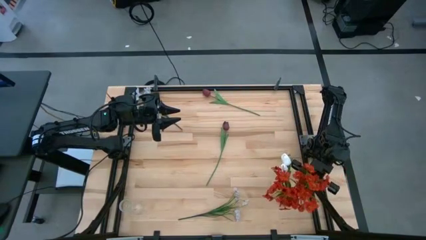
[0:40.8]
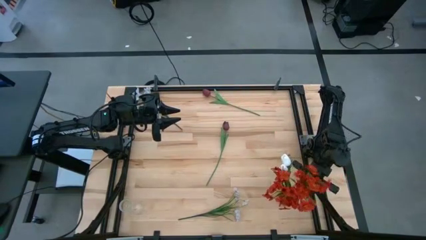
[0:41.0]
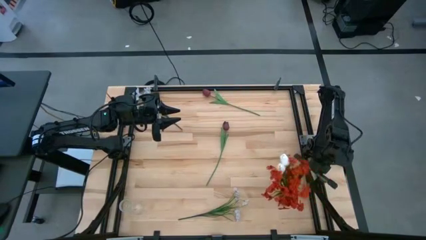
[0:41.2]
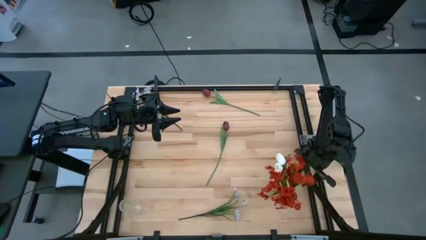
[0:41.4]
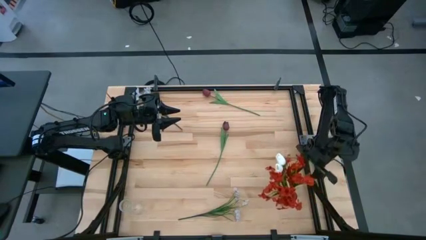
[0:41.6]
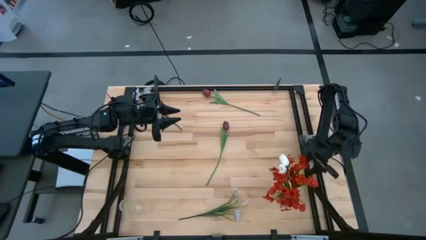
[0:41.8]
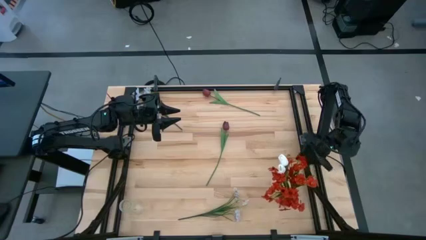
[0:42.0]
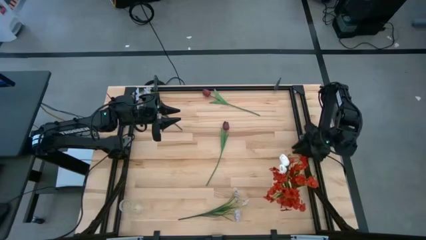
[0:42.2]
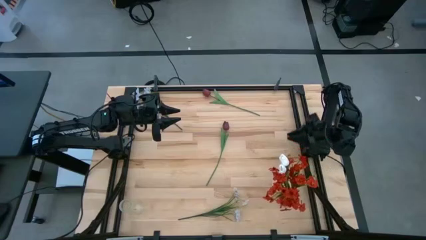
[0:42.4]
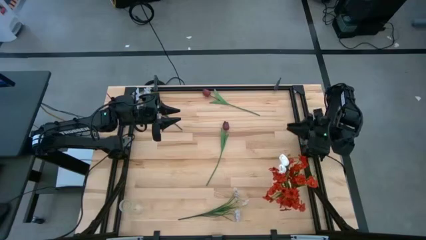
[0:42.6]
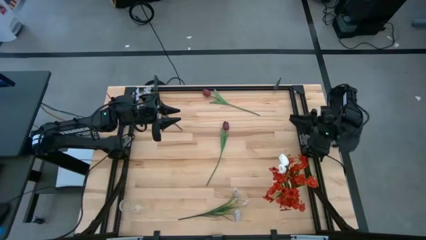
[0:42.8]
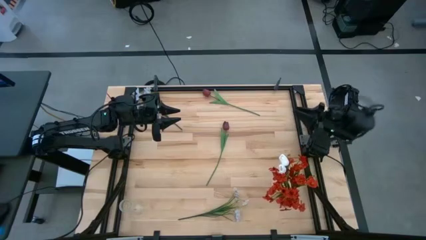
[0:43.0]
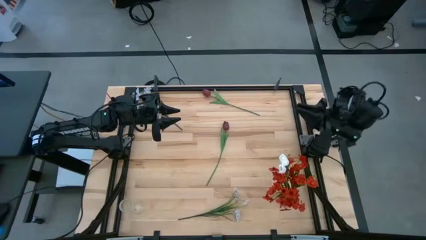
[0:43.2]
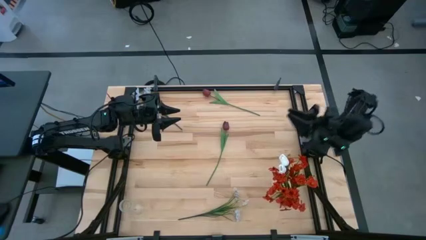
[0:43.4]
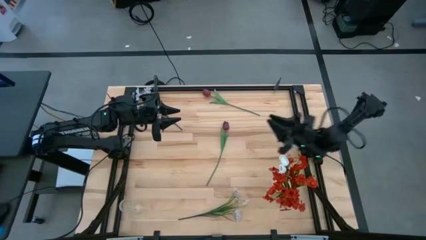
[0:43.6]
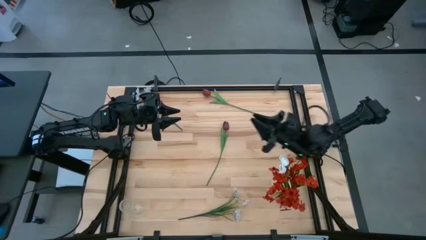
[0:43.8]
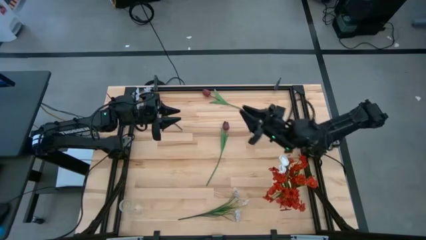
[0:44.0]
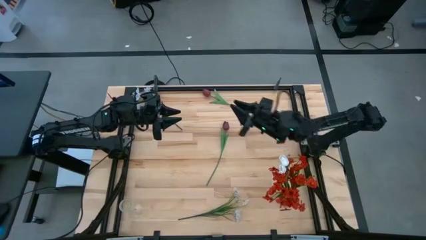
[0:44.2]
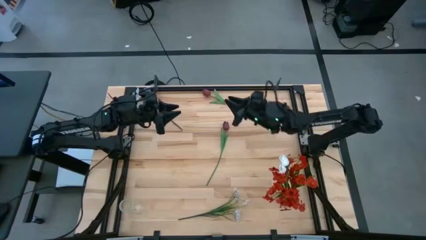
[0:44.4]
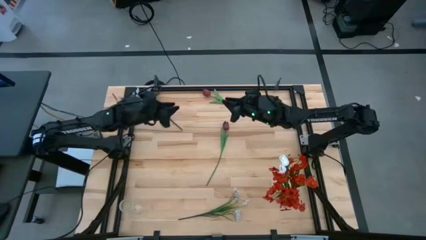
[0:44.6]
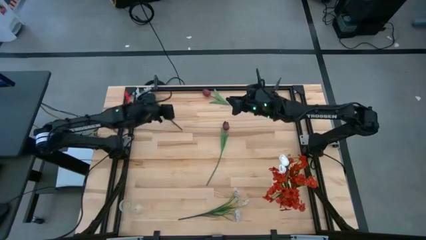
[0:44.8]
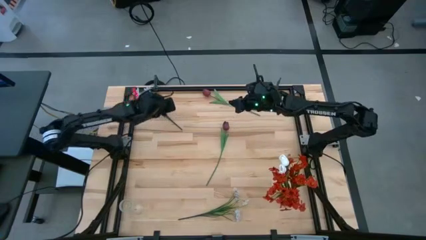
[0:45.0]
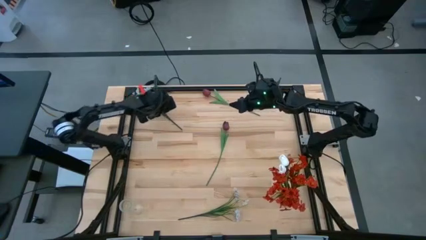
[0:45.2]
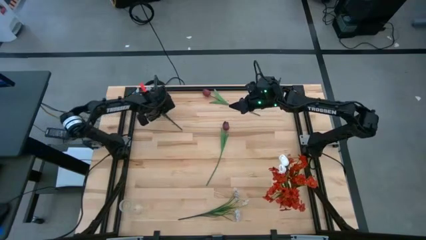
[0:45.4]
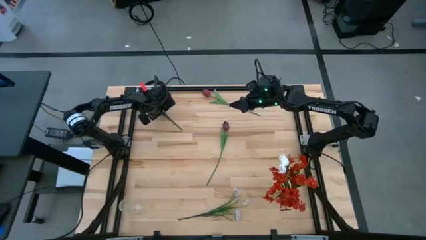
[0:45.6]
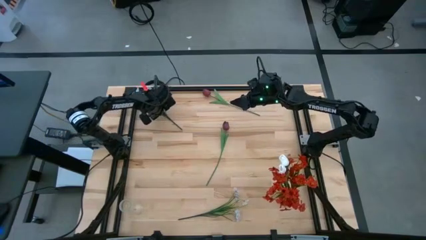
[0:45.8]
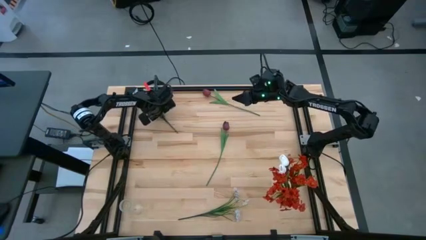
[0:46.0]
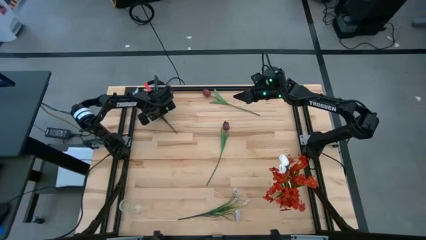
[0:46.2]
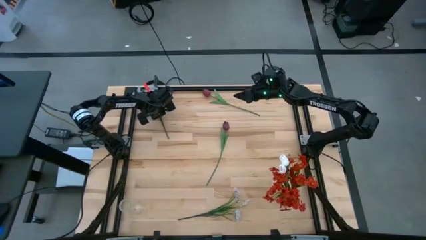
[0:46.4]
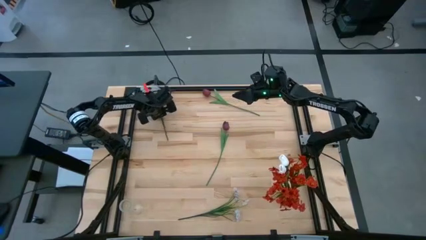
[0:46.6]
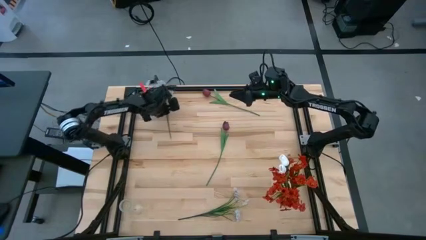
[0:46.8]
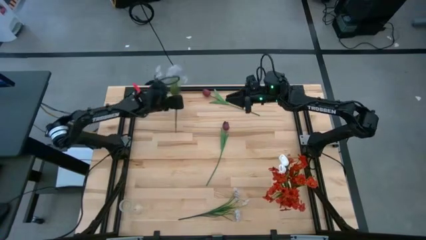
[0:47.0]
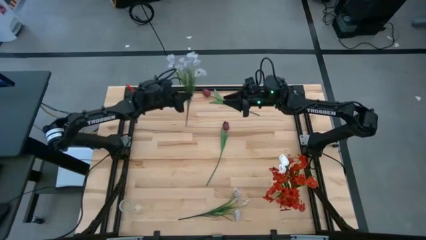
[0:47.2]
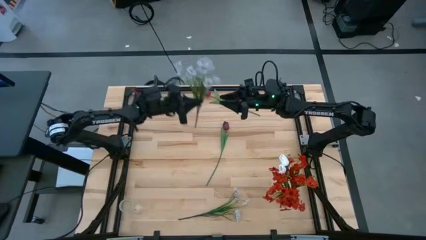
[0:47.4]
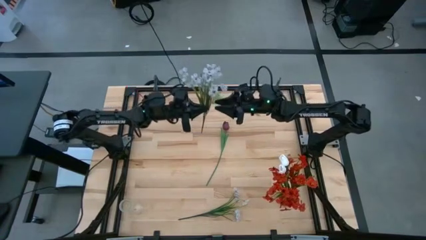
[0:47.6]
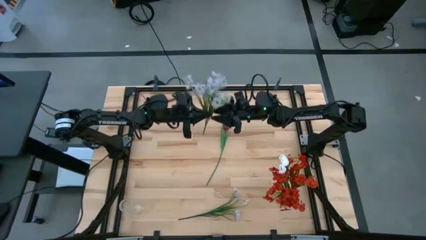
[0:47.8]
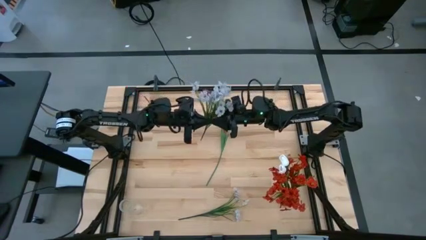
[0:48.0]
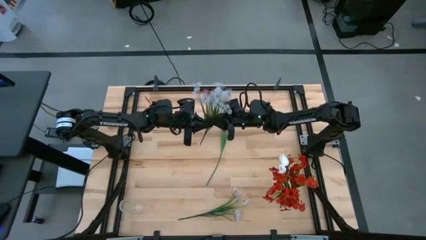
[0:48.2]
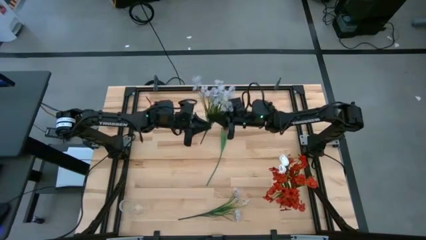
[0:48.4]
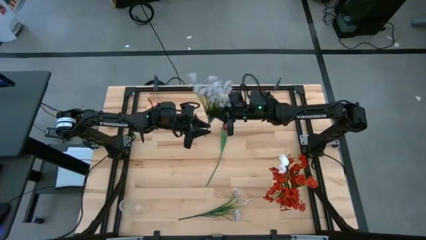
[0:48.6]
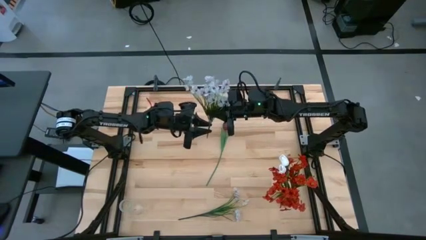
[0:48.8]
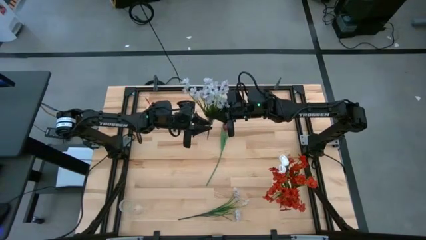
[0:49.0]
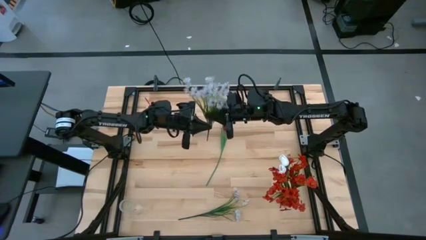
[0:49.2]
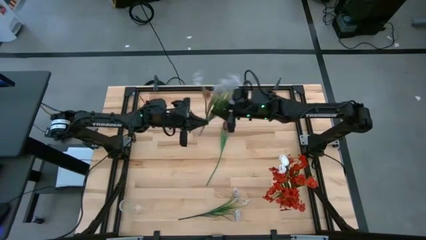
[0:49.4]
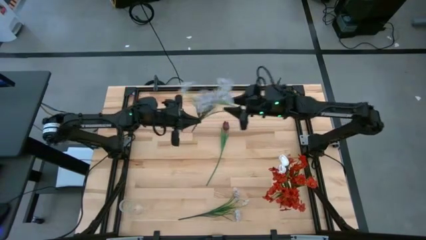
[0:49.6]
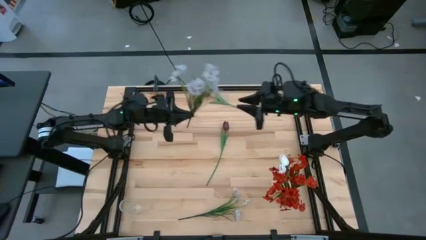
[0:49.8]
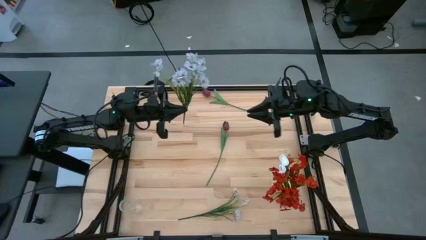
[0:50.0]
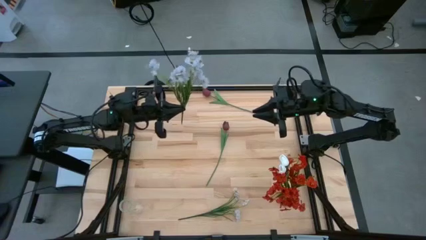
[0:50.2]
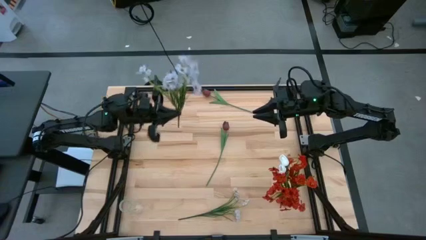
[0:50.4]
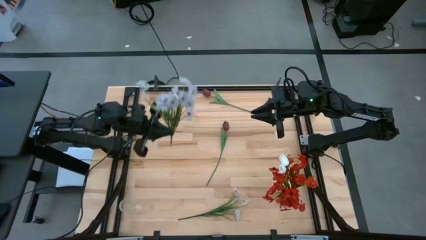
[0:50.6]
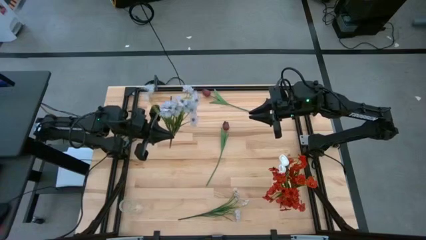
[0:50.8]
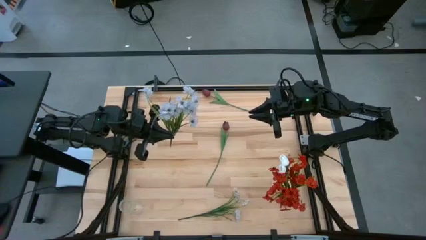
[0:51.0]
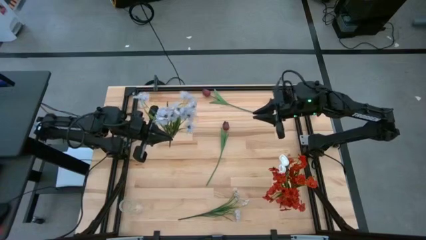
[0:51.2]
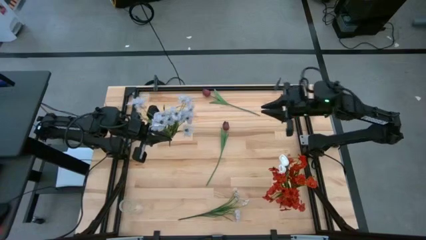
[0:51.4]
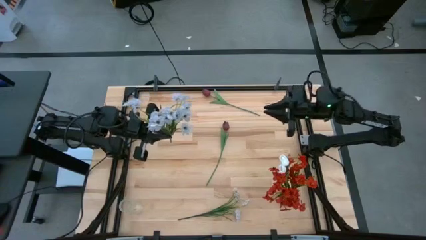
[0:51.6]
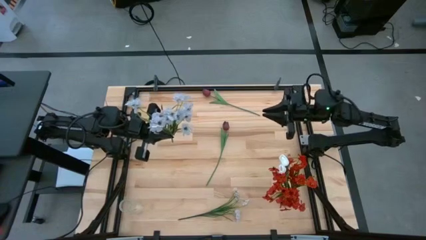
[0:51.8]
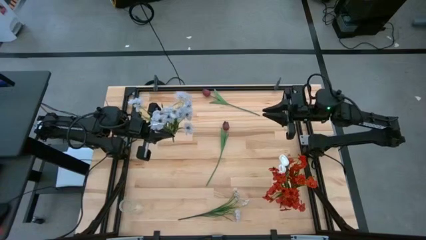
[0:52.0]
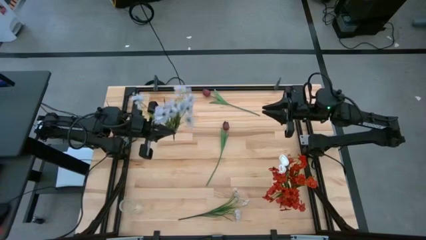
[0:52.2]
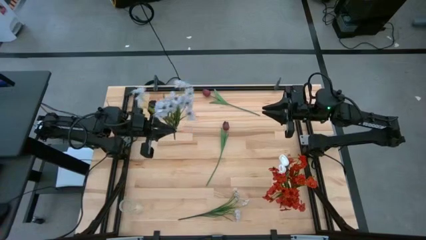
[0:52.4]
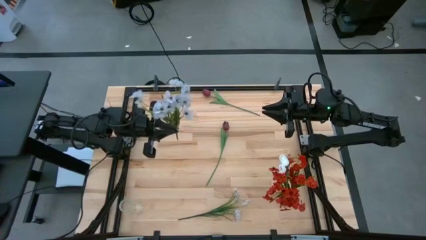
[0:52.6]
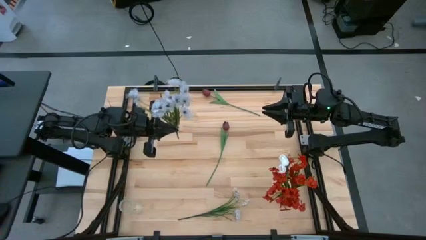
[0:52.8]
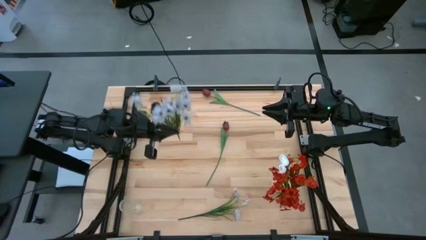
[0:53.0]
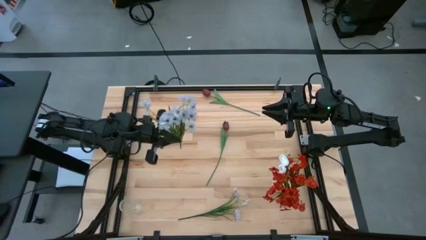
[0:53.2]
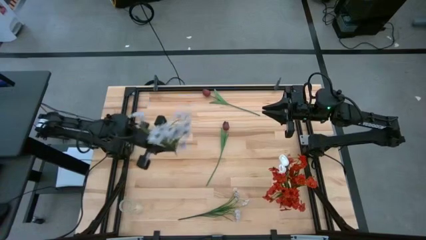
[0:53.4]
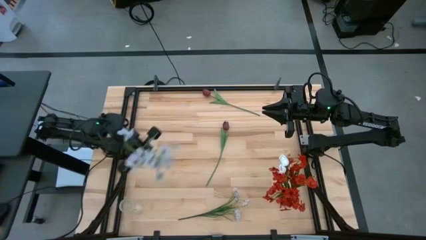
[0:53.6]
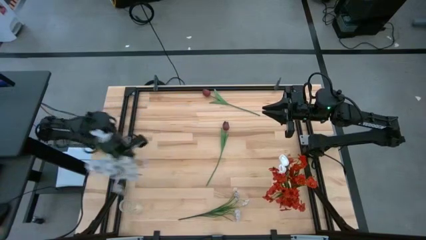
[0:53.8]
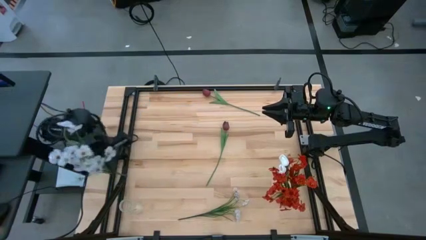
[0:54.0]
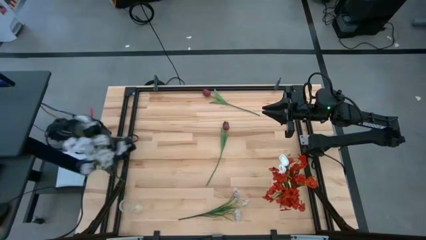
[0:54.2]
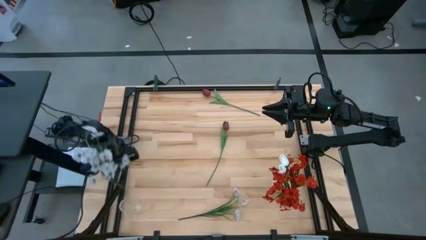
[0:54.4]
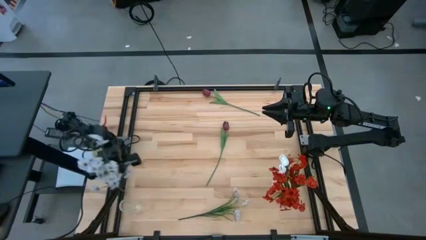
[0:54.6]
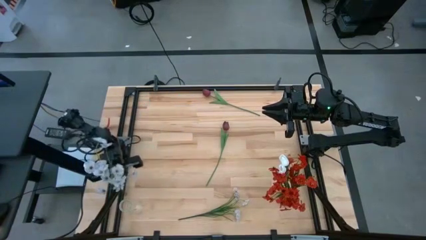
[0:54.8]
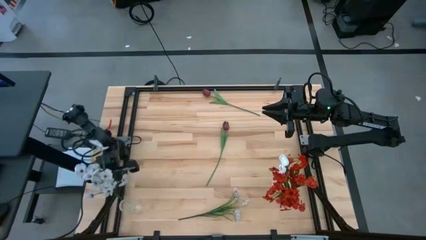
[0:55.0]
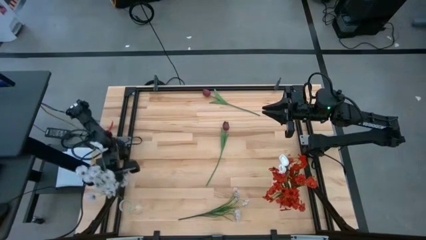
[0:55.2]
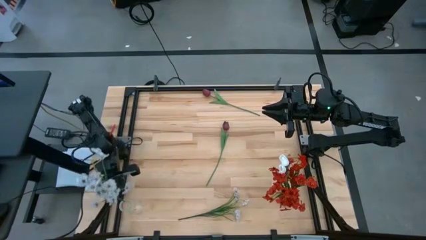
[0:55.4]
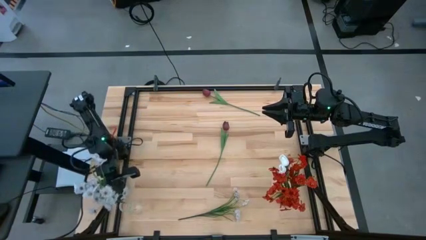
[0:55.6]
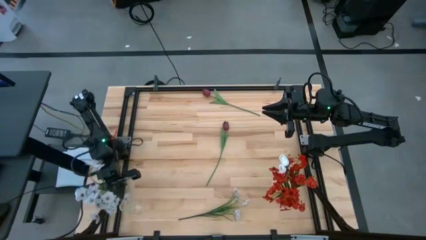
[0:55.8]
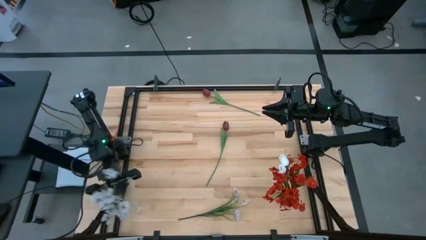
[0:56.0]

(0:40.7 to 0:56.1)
Task: Sort flowers into vase by color
Put the top left white flowers into the transparent vase

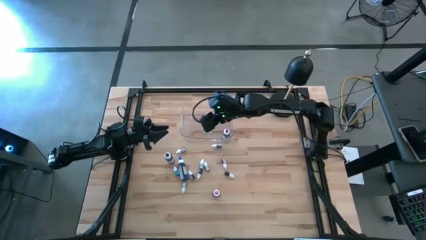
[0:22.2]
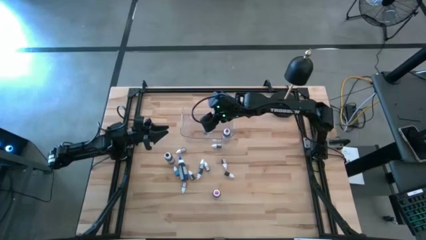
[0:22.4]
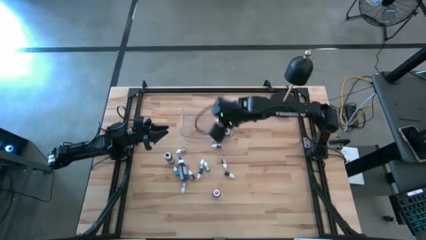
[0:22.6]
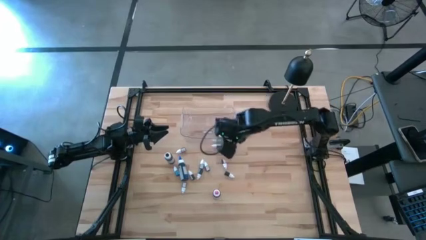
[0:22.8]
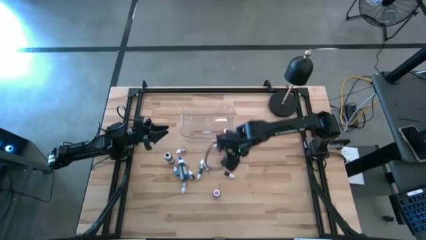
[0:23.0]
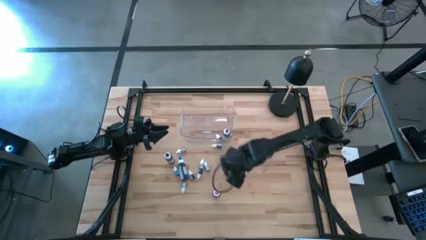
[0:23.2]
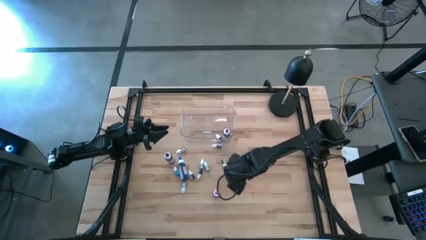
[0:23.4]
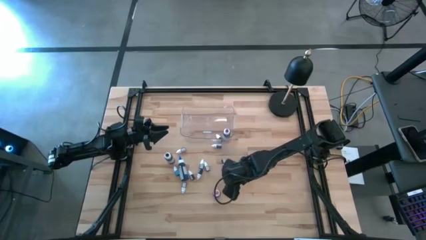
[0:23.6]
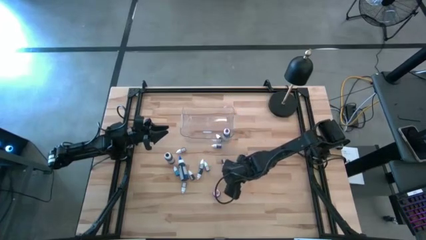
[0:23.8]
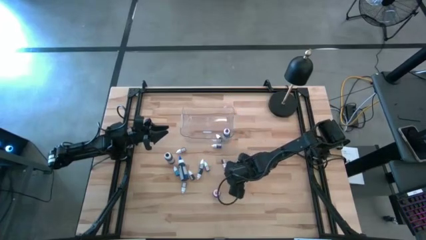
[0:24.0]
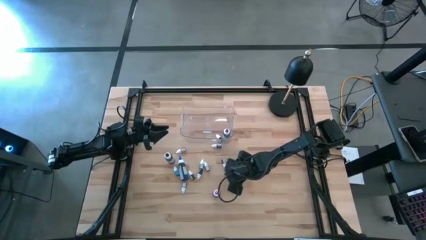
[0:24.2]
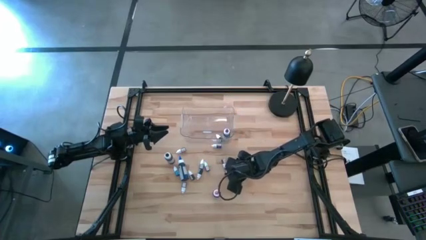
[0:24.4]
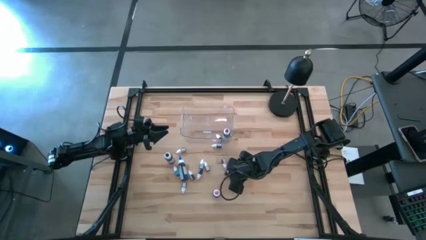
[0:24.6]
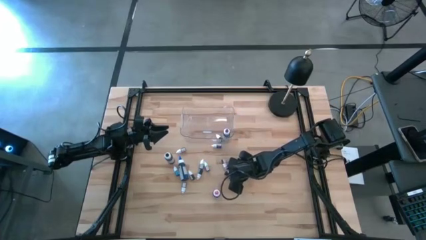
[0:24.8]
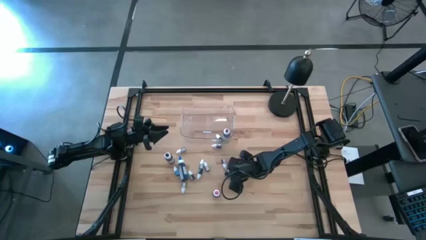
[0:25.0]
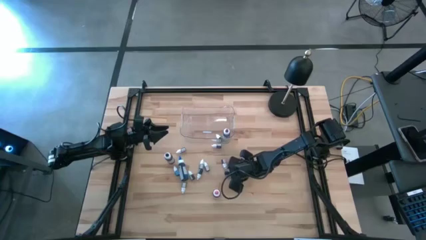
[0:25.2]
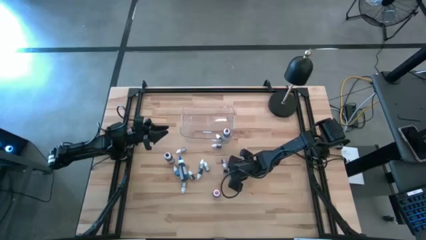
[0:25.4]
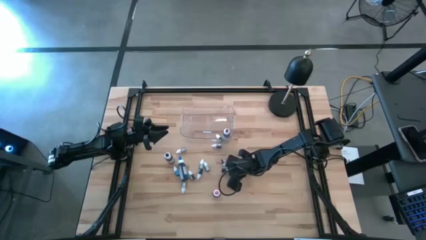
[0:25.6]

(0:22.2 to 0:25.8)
Task: Pick & Place food coloring
Put the small green food coloring bottle into the transparent bin
